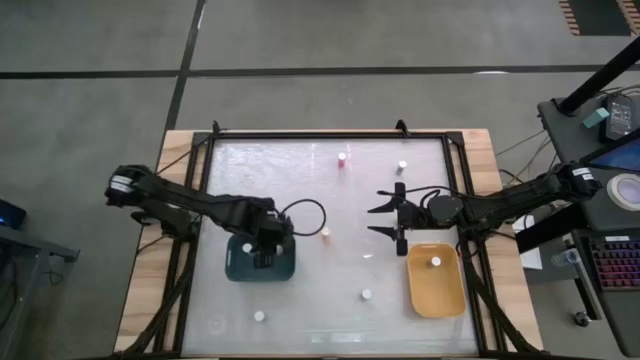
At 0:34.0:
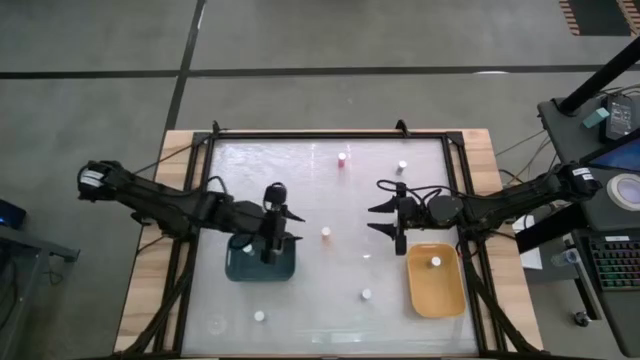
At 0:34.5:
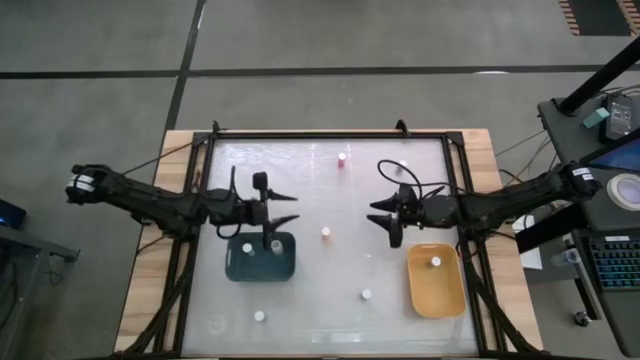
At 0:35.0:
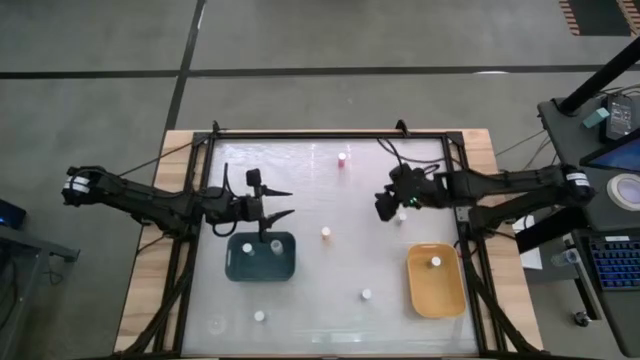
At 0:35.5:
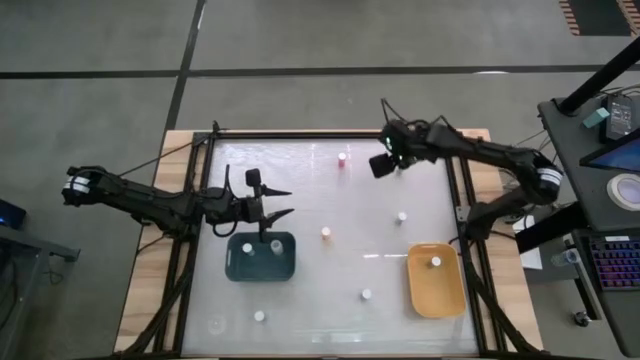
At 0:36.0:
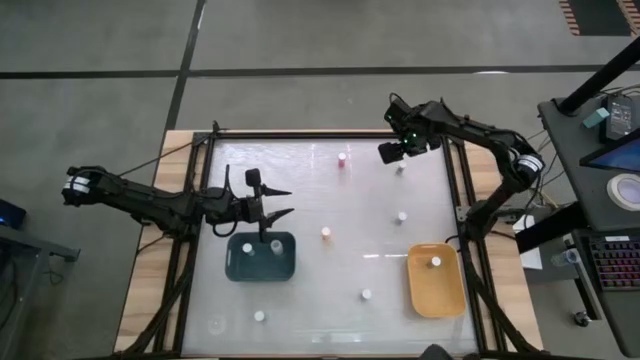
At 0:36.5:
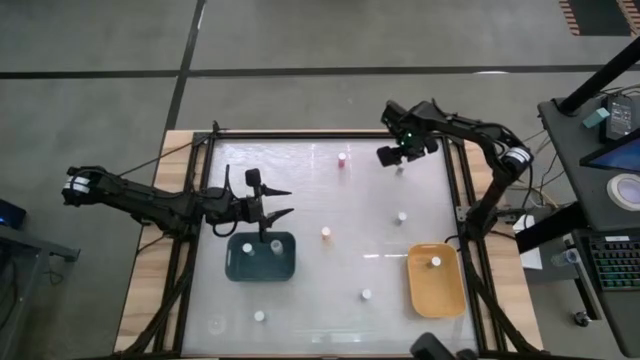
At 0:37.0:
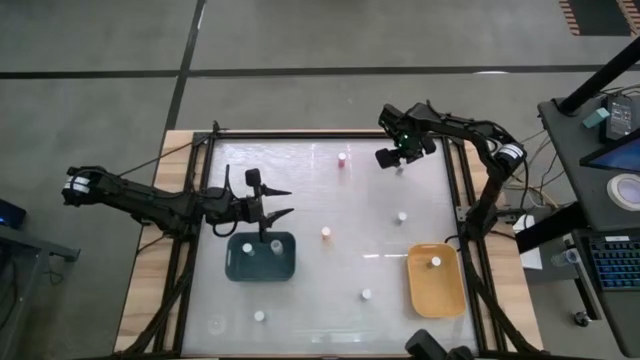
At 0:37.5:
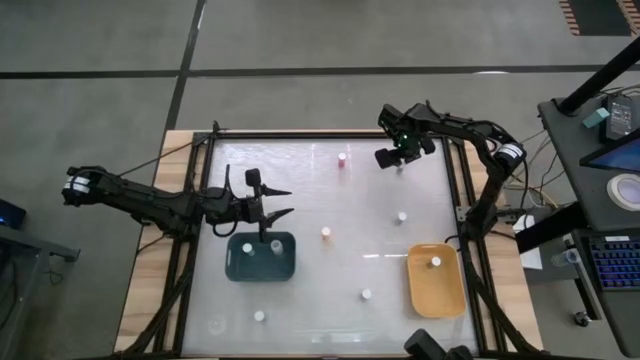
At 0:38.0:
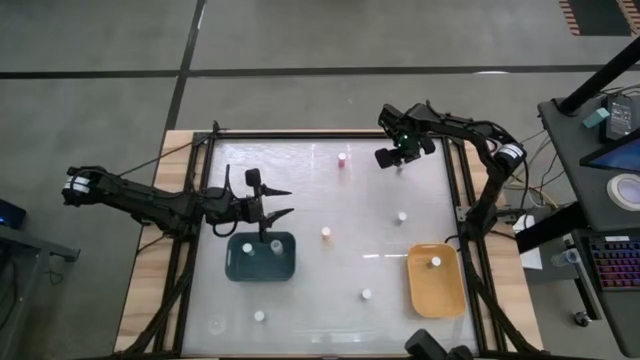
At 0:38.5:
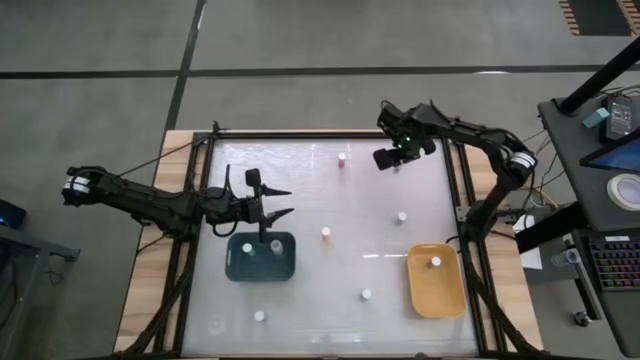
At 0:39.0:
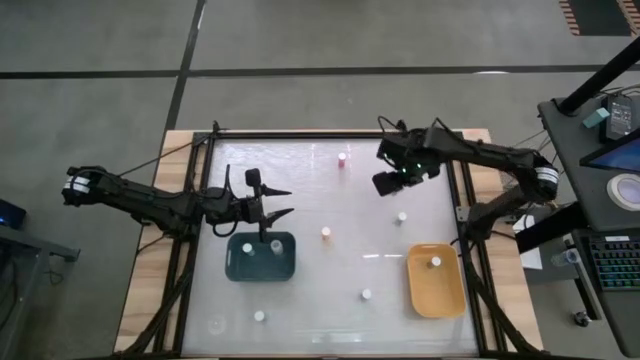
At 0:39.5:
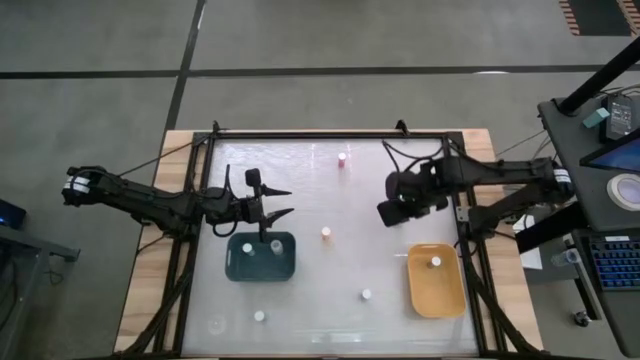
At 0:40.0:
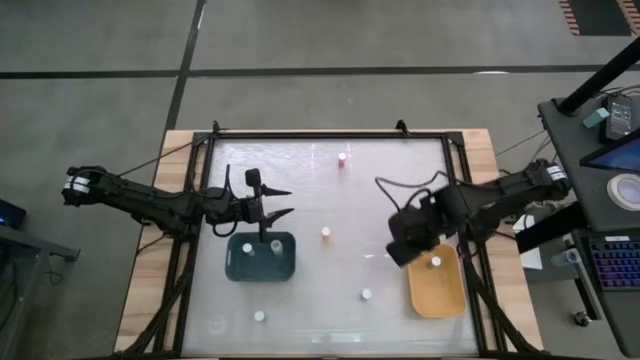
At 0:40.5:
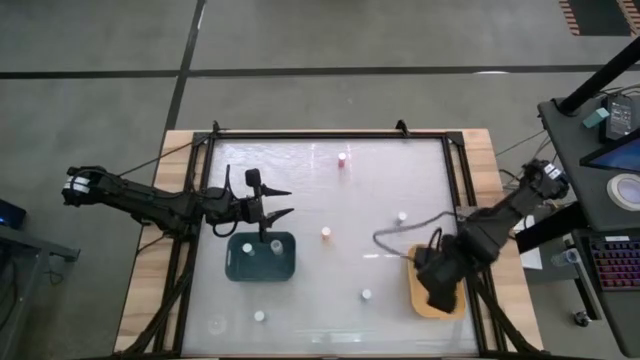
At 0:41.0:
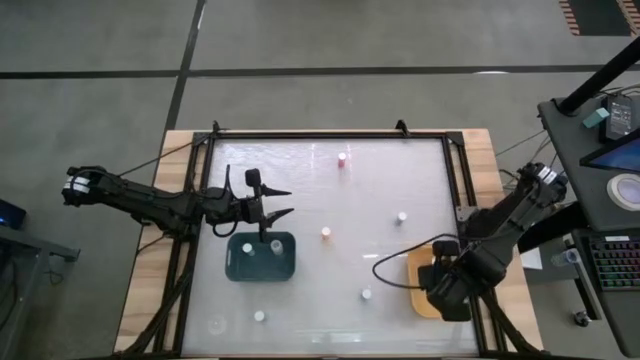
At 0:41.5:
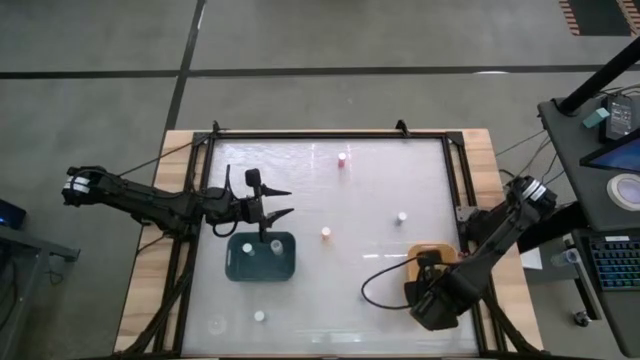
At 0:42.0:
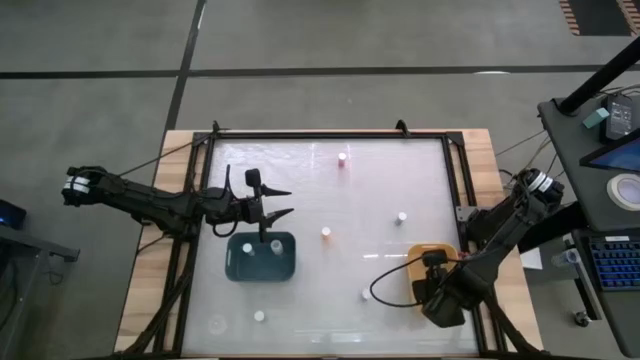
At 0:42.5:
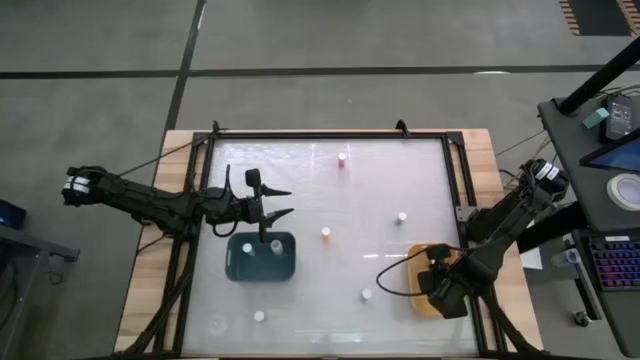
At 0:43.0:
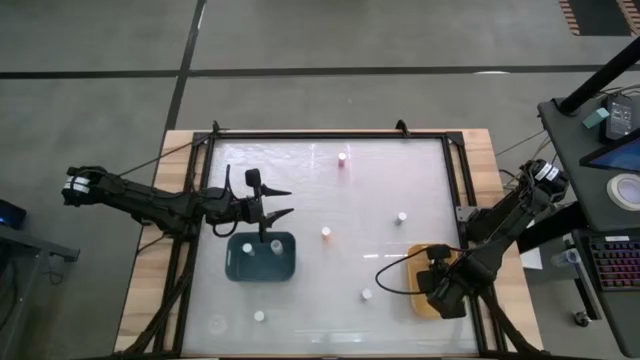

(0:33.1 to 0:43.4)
Task: Pick and place medicine bottles into bin by pill shape (circle, oval)
Put the blue bottled capsules into the yellow bin

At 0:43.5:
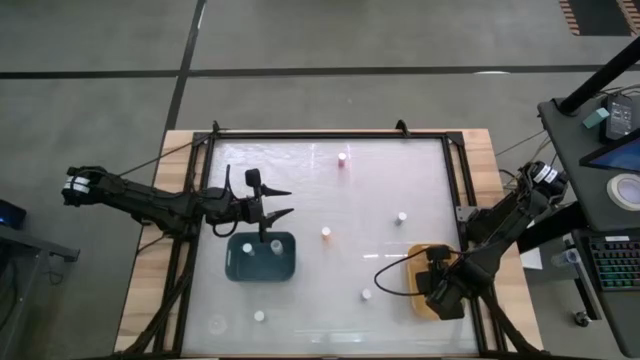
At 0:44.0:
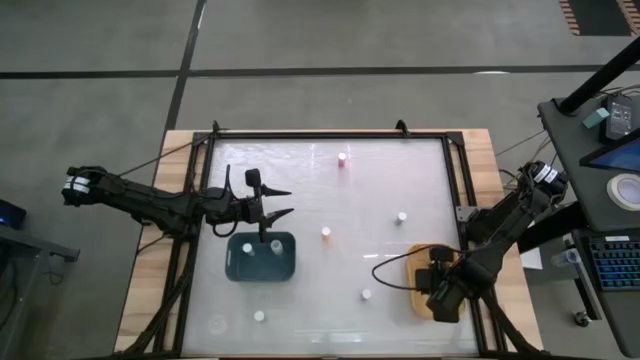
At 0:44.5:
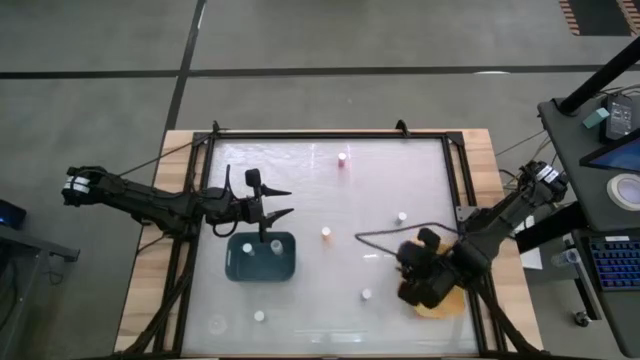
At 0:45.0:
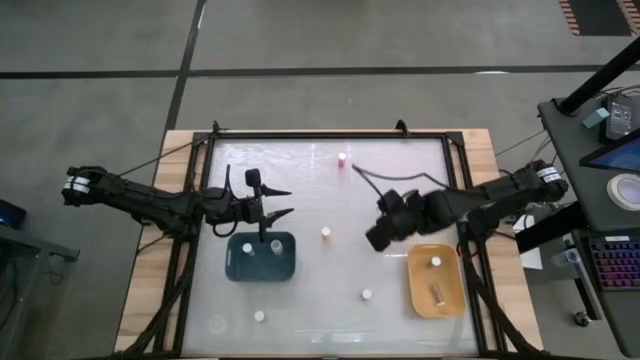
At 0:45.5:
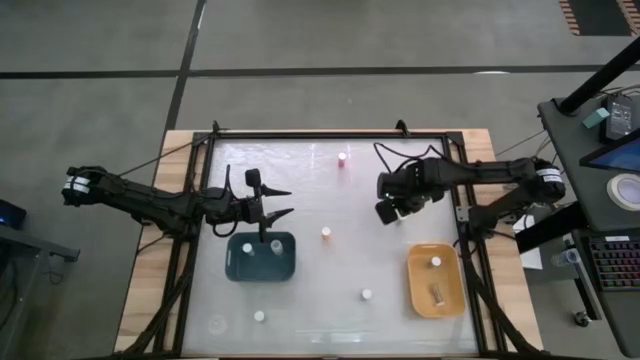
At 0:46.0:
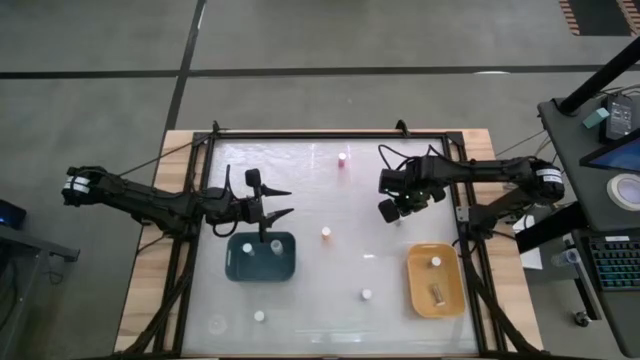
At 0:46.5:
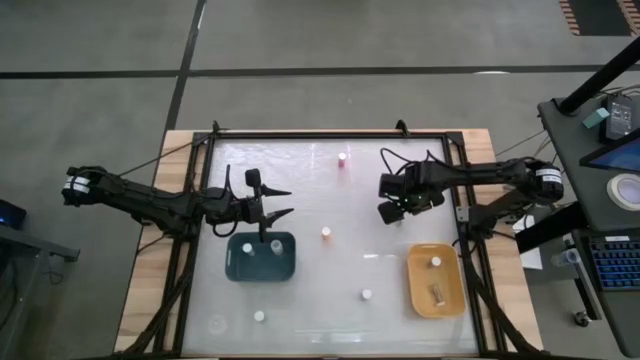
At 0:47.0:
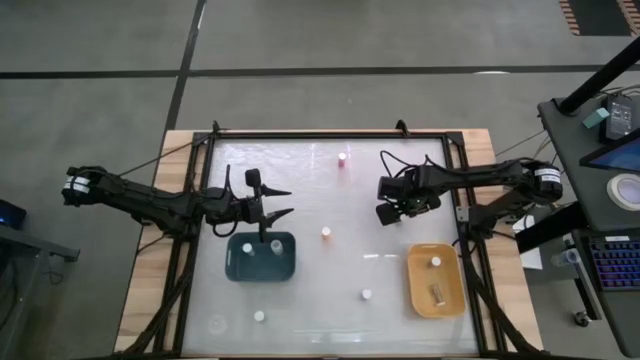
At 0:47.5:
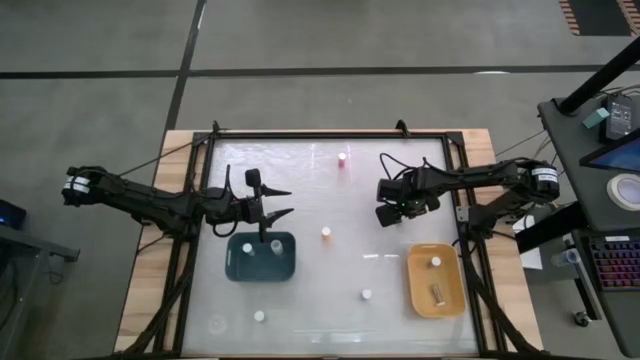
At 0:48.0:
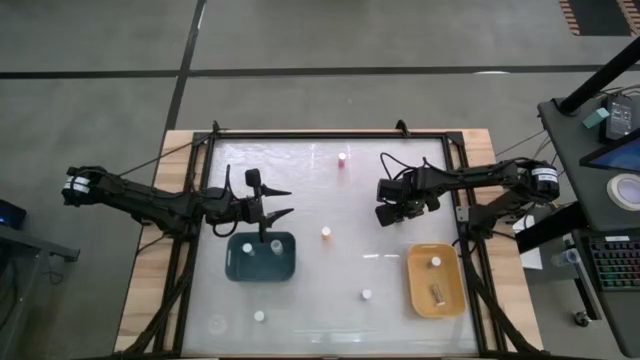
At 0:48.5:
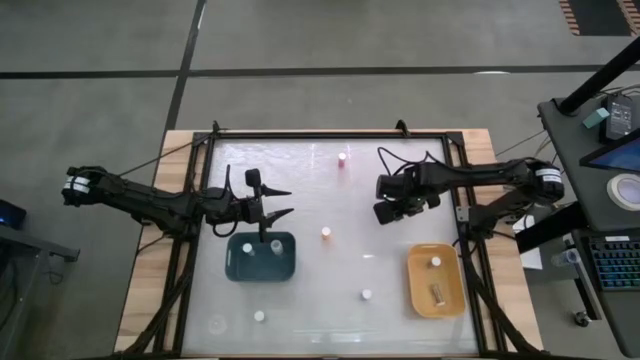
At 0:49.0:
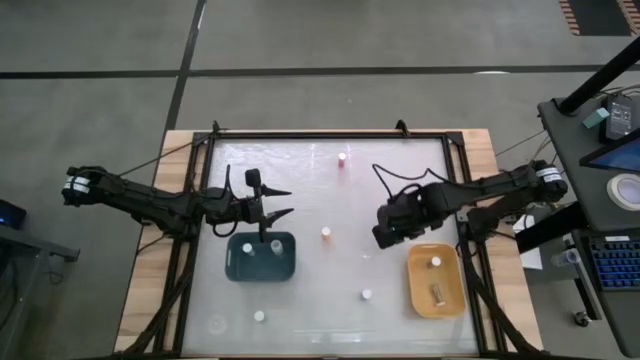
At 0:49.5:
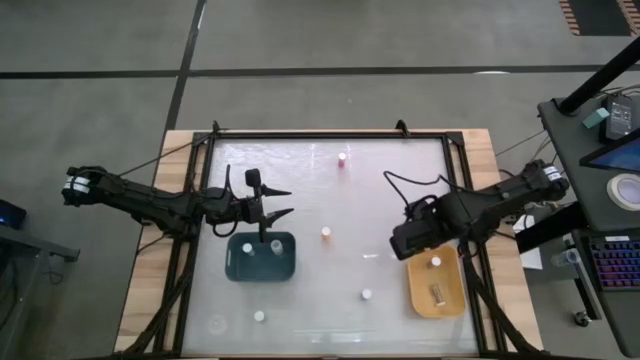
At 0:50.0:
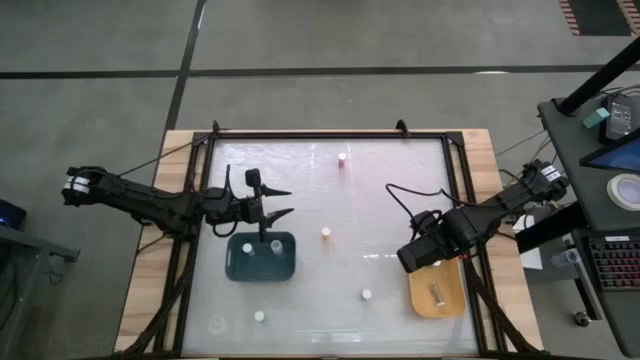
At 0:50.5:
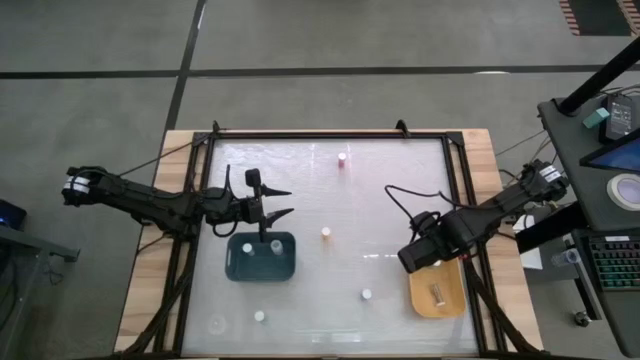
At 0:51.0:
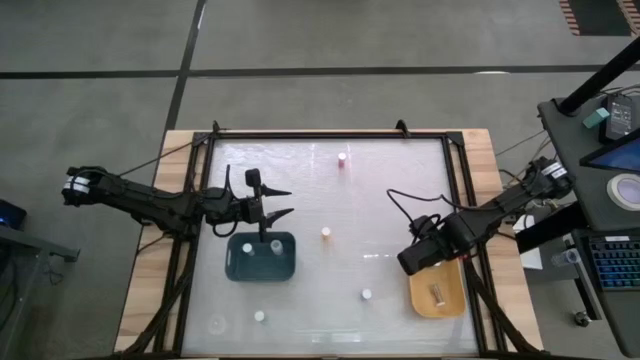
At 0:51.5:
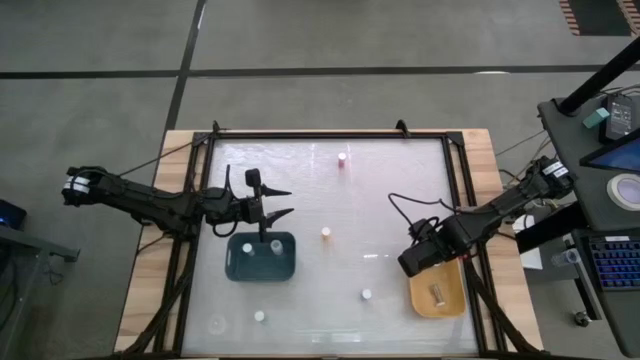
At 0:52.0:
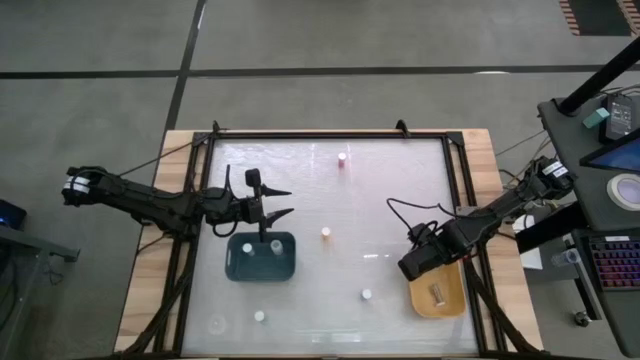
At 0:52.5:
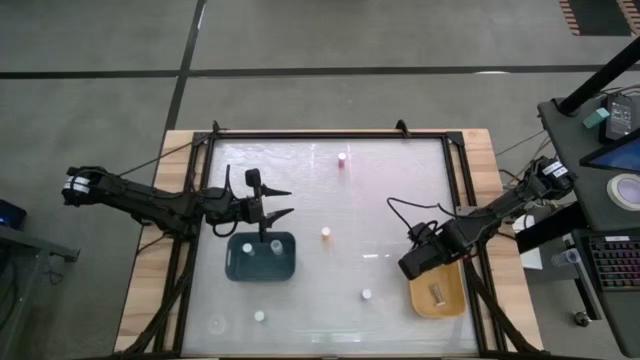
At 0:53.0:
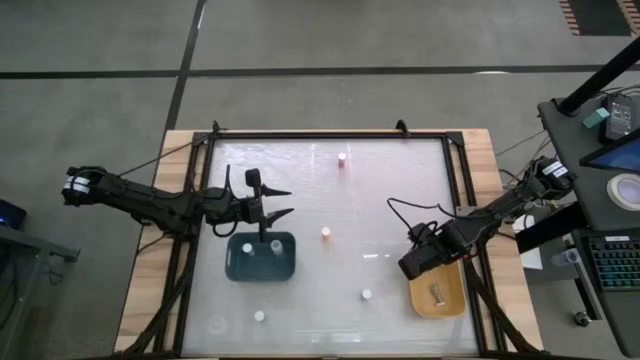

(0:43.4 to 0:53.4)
Put the blue bottled capsules into the yellow bin

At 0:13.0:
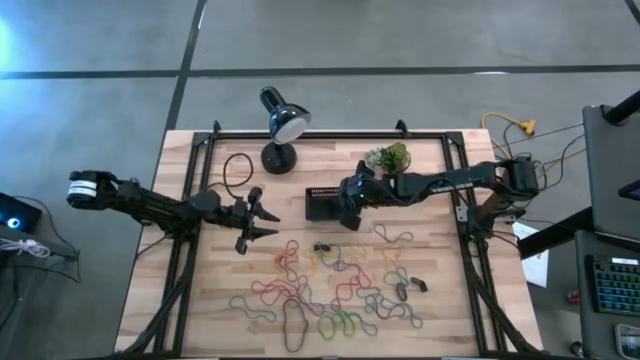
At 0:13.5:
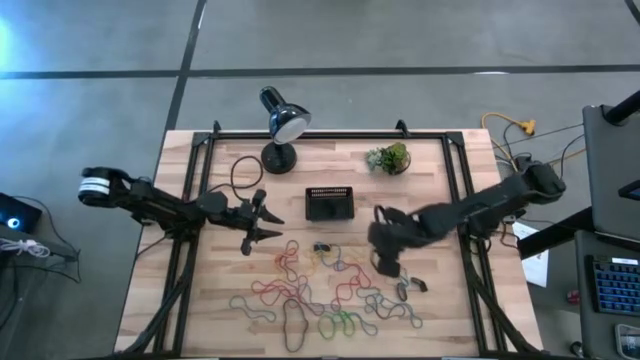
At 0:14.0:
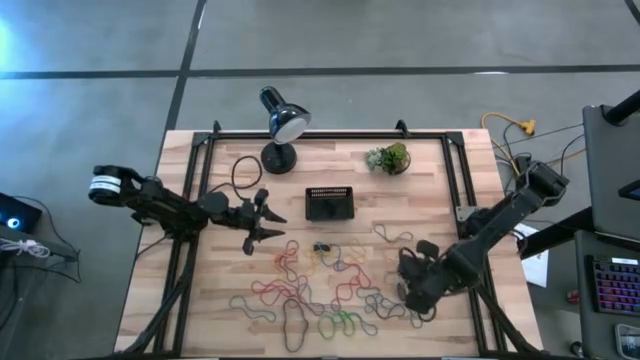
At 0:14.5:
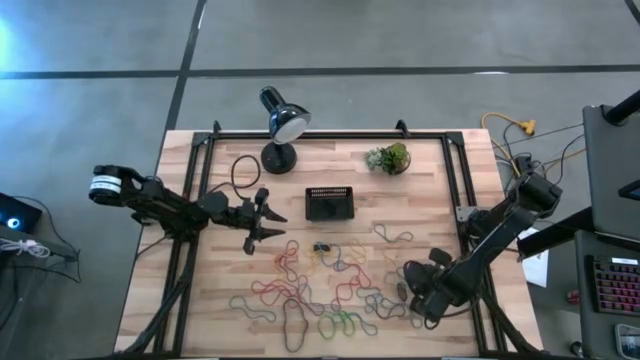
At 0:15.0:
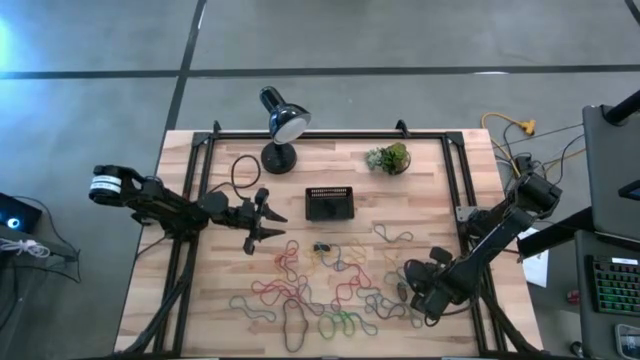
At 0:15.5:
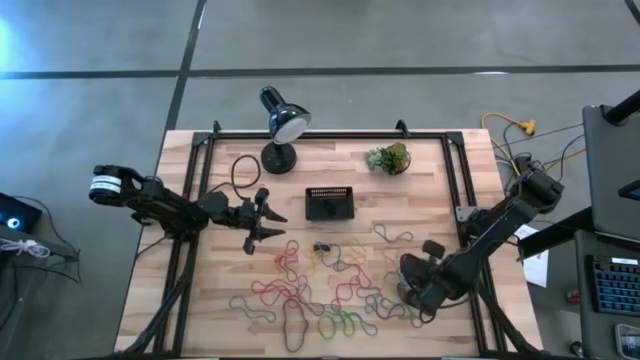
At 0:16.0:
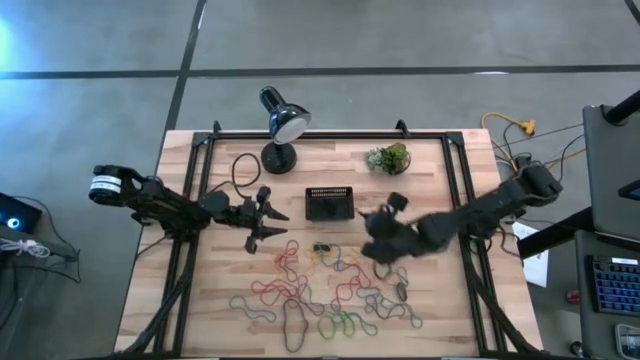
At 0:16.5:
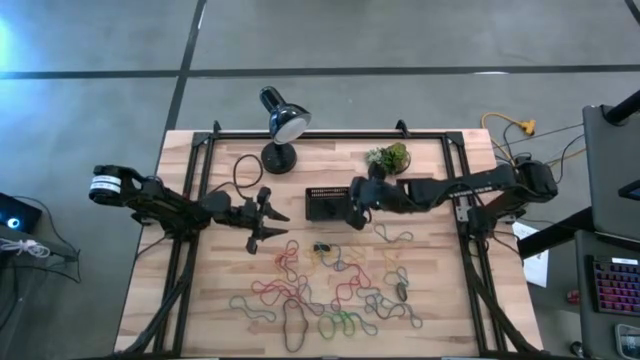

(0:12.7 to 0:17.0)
Task: Pick and place rubber bands into bin
Put the black rubber band into the bin
